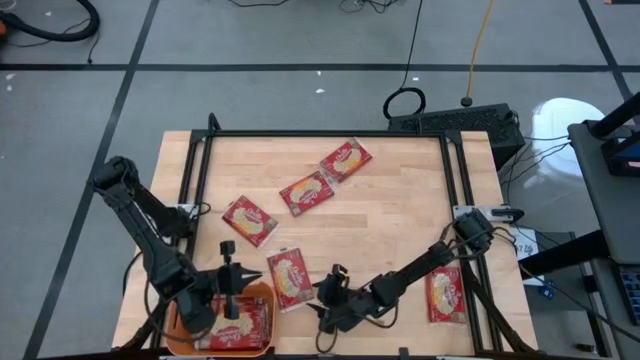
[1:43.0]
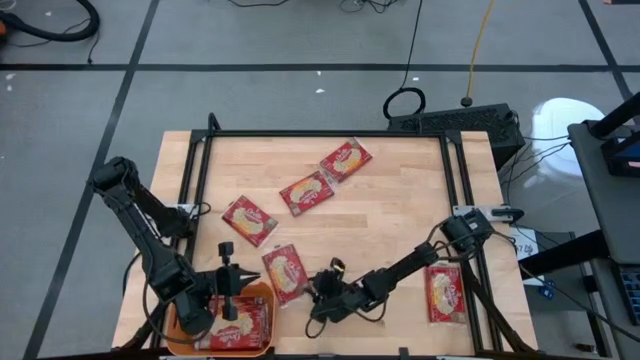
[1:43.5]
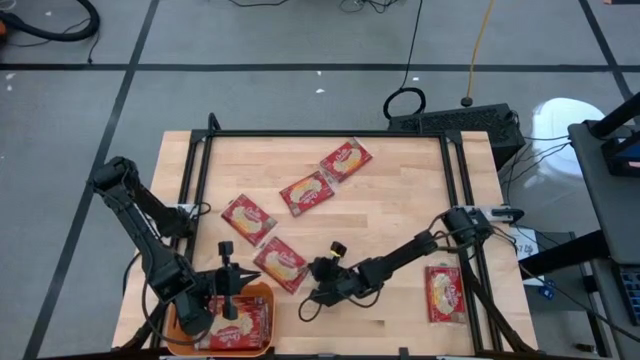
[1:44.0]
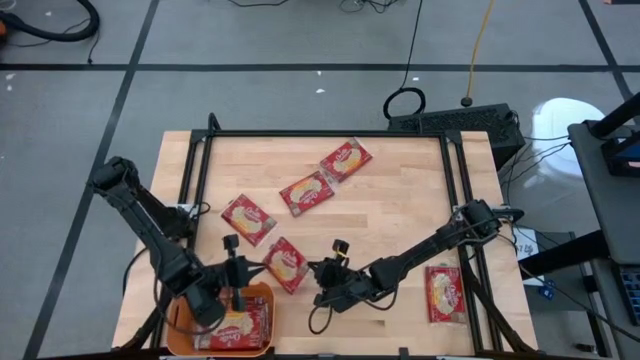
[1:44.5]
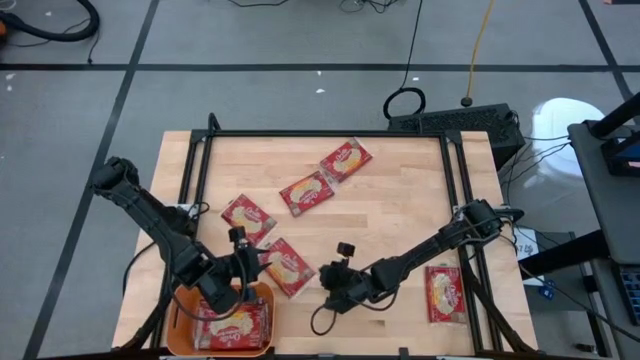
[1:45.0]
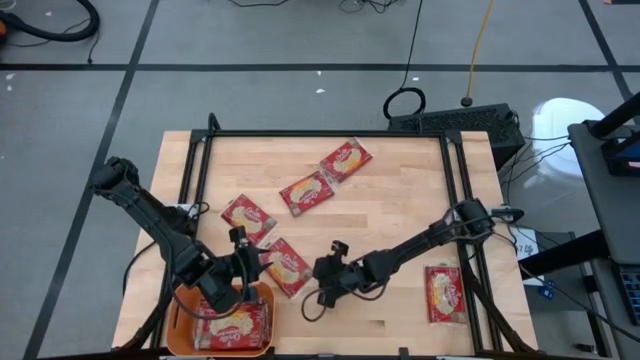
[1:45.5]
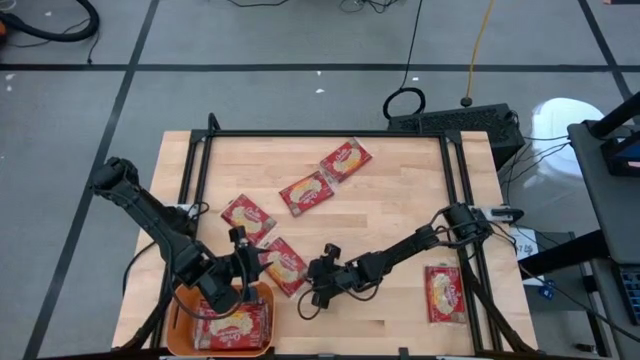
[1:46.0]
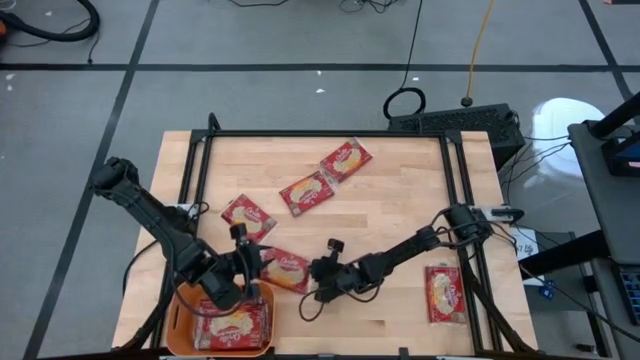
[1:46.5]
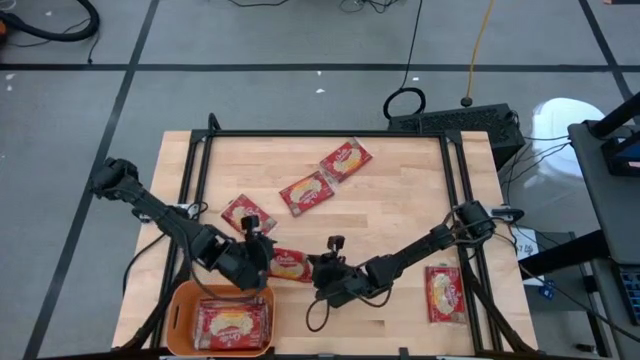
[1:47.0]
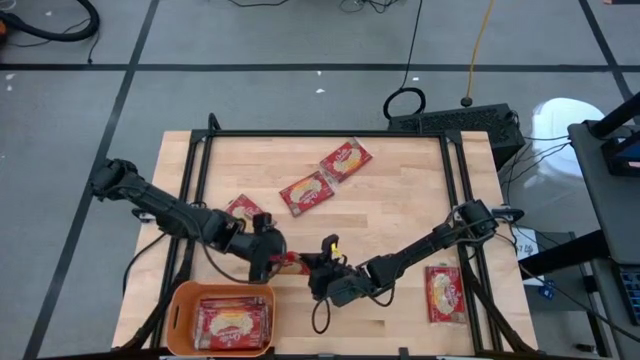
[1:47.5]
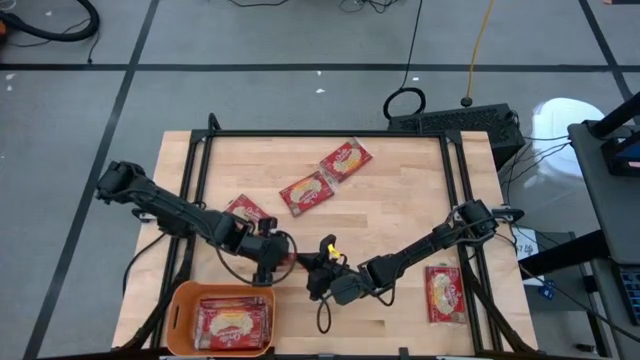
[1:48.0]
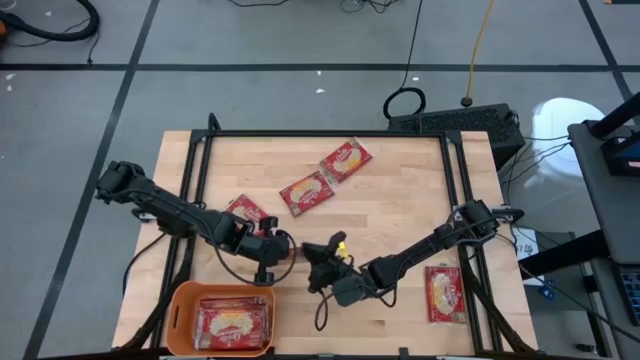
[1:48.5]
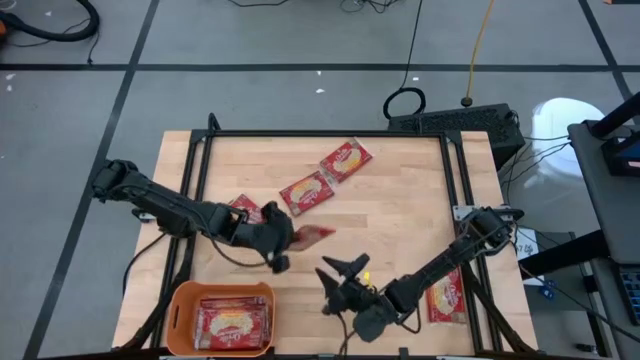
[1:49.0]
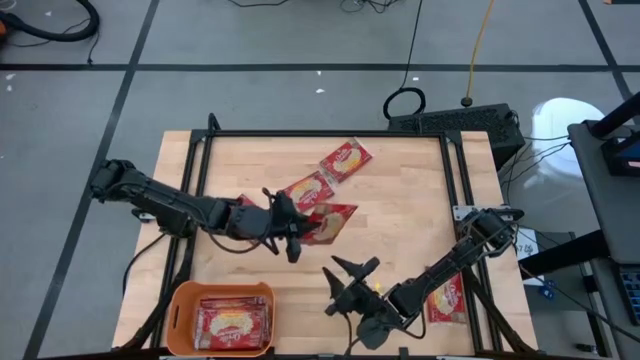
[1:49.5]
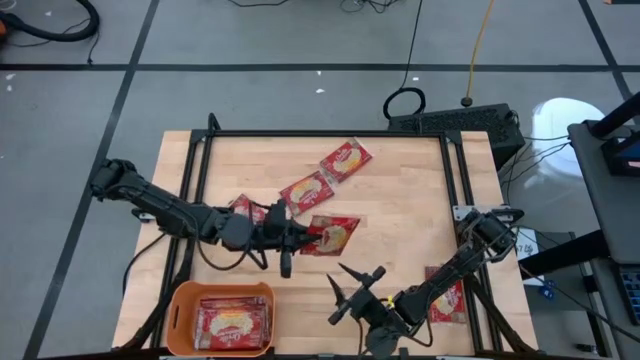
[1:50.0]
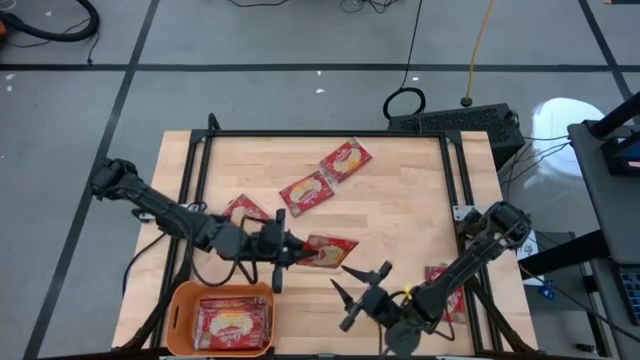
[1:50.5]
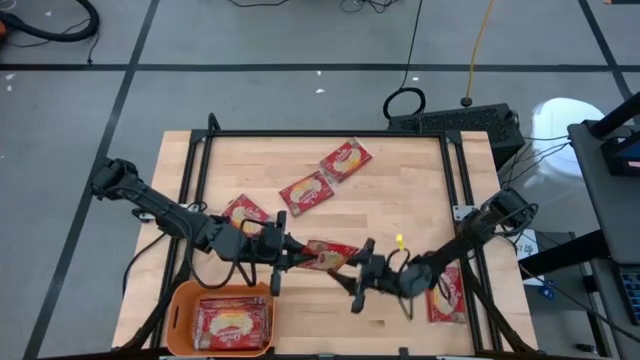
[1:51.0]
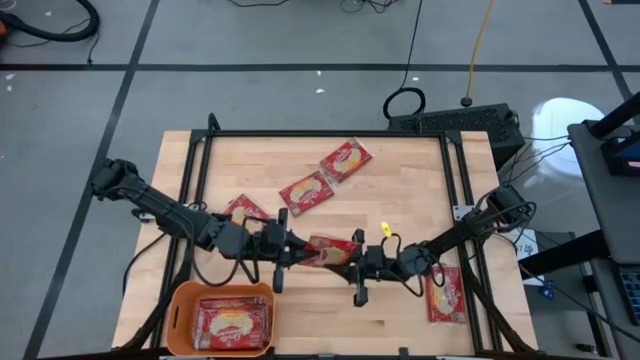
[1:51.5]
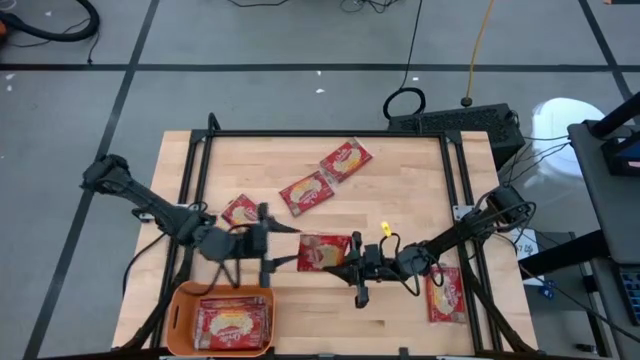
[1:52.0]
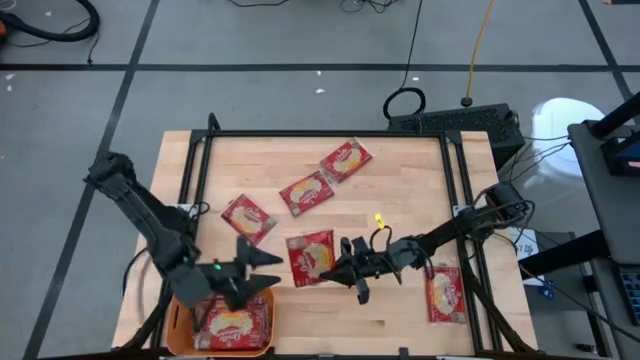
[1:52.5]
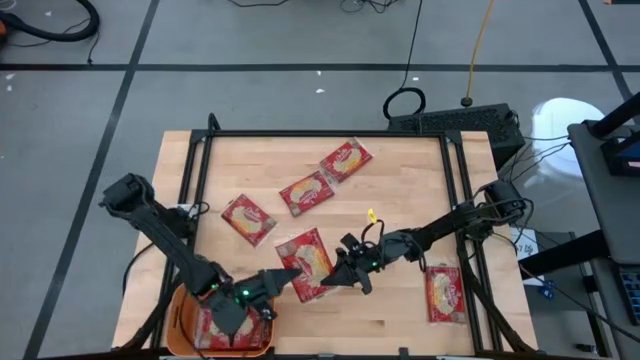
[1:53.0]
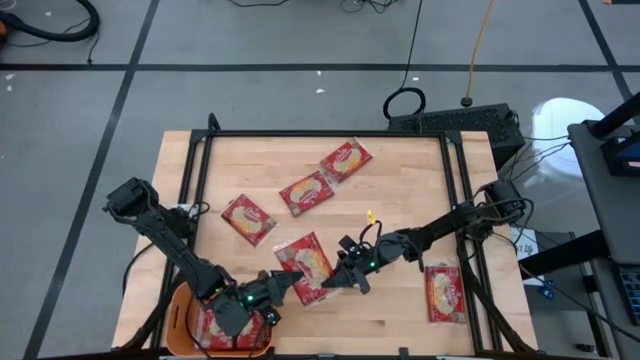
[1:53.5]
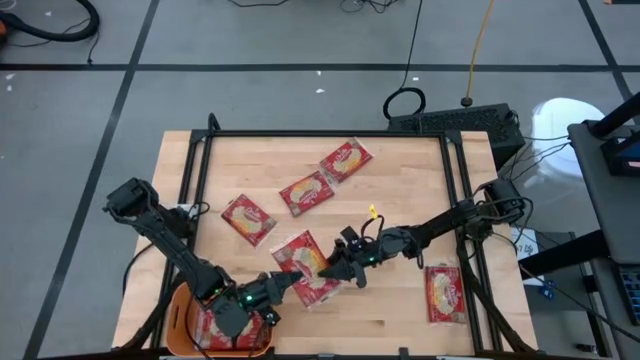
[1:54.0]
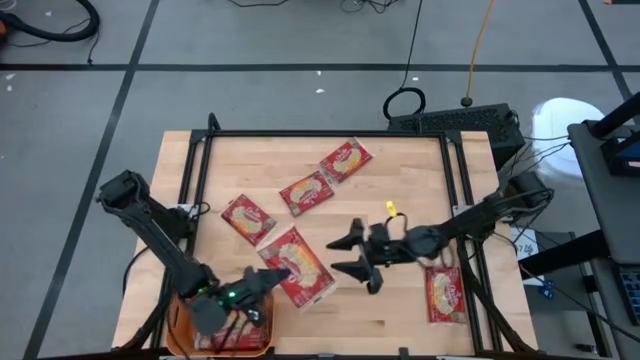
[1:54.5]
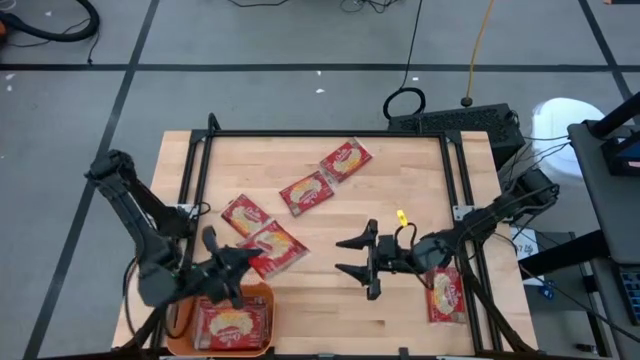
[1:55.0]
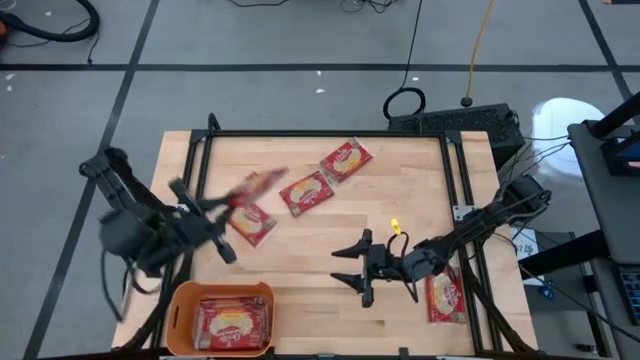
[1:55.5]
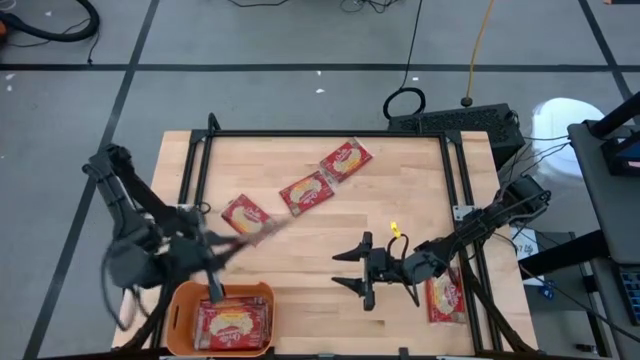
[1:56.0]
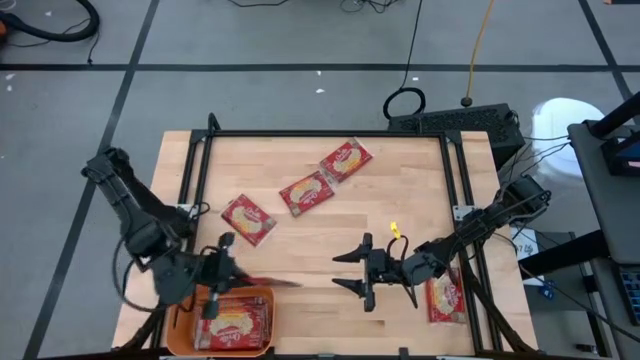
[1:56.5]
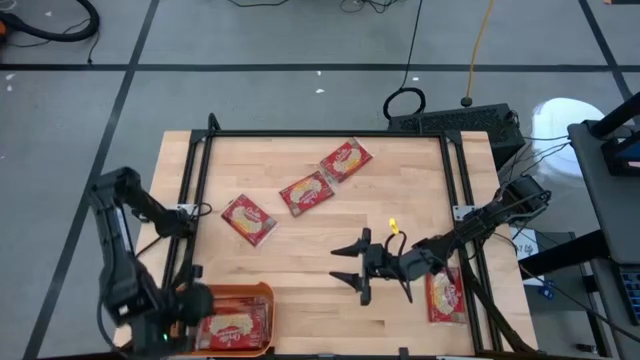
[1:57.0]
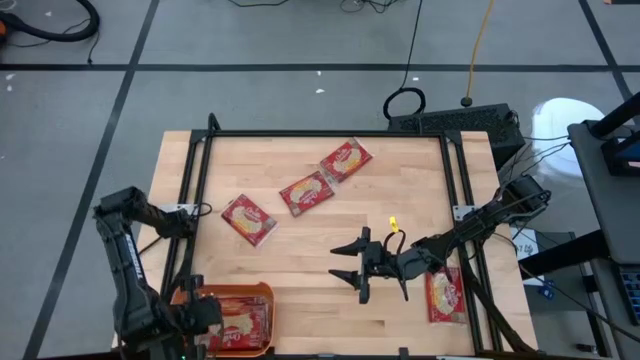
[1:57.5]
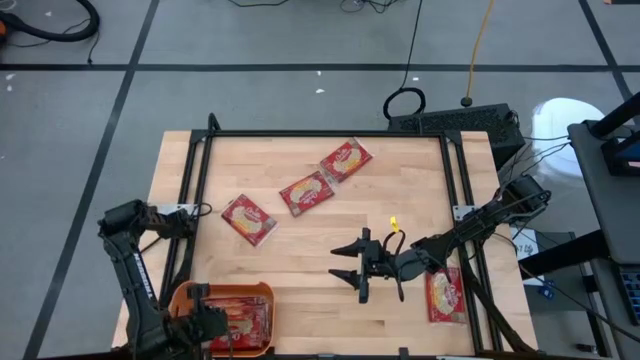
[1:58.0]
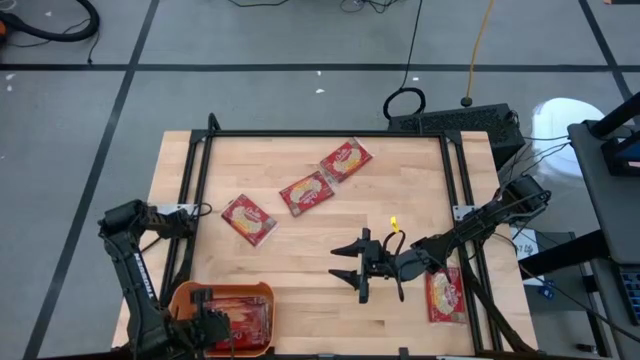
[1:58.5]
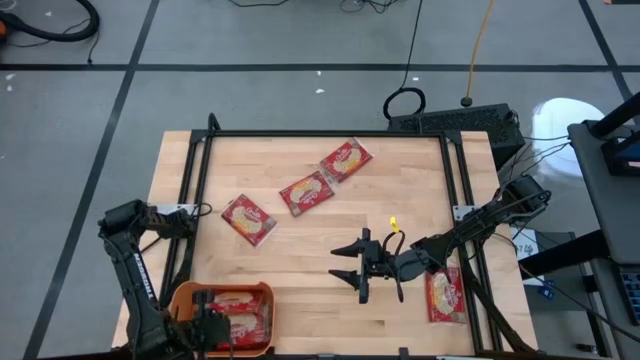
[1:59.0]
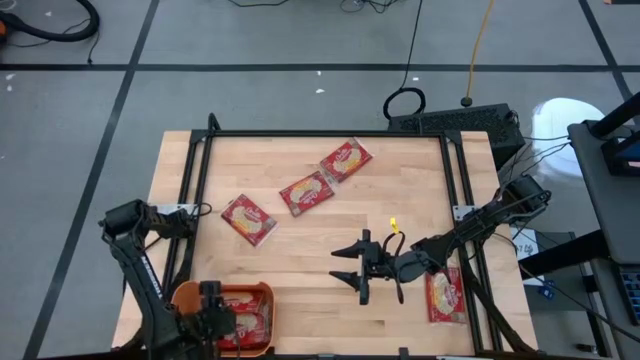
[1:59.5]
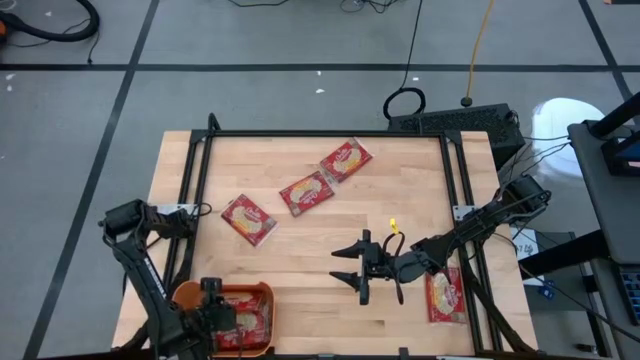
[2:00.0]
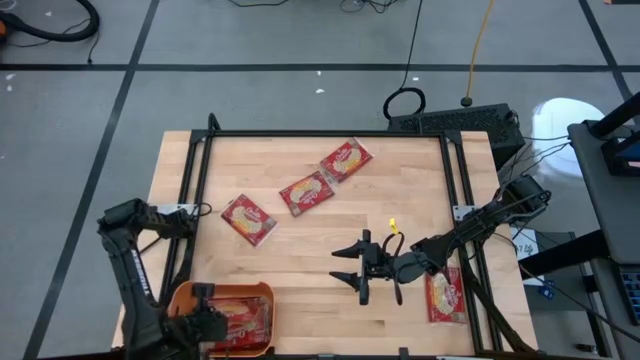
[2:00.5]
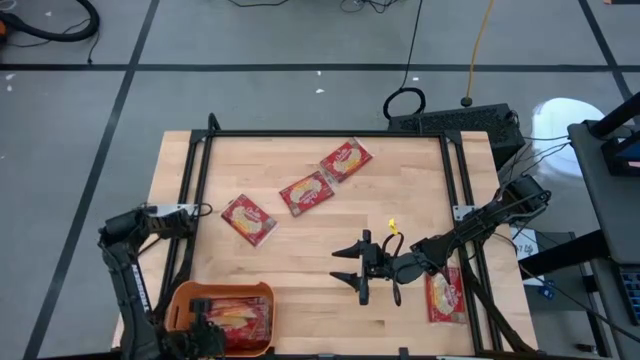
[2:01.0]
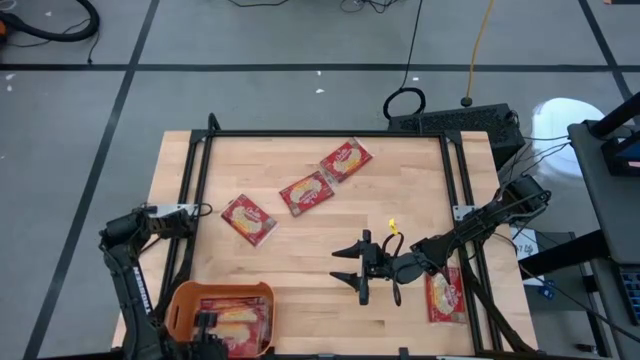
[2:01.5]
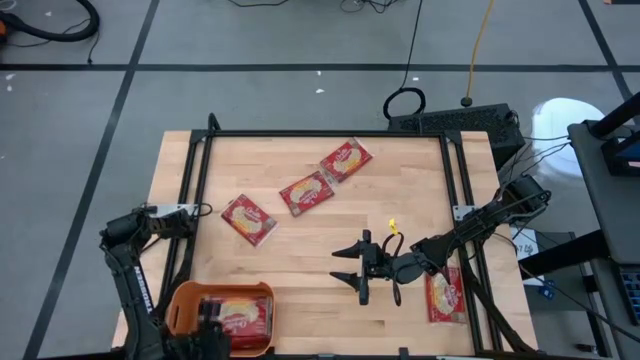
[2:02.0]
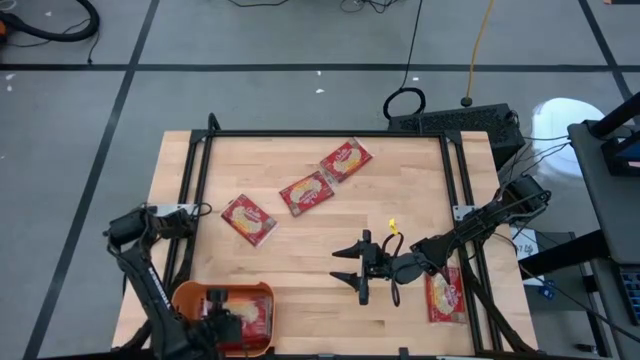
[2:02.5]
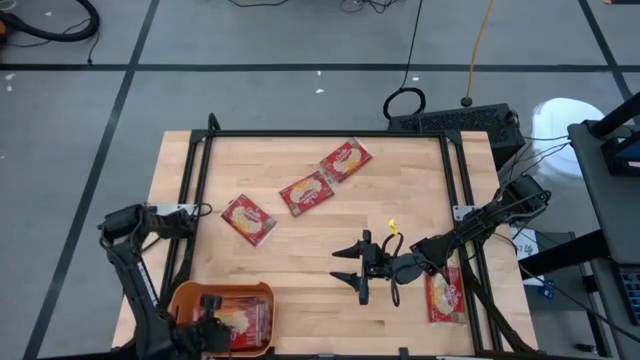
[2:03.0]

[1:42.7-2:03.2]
Task: Sort popcorn bags into baskets
Put the popcorn bag into the orange bin
